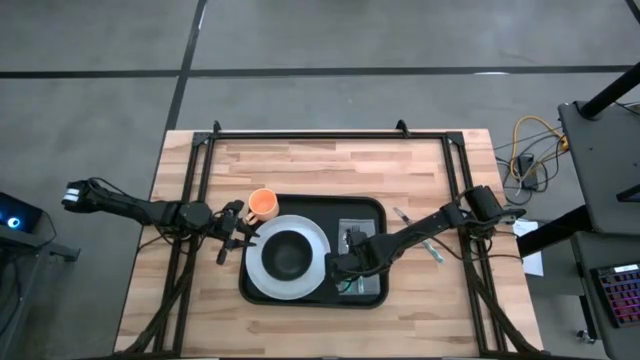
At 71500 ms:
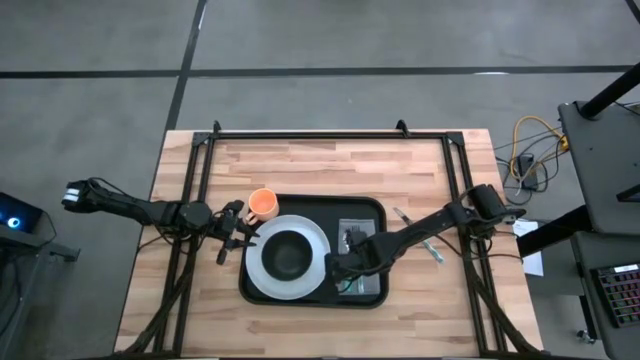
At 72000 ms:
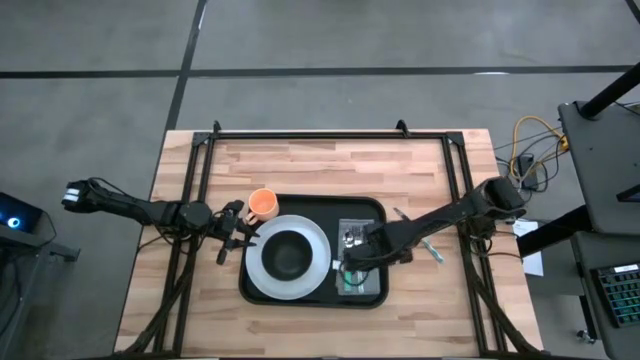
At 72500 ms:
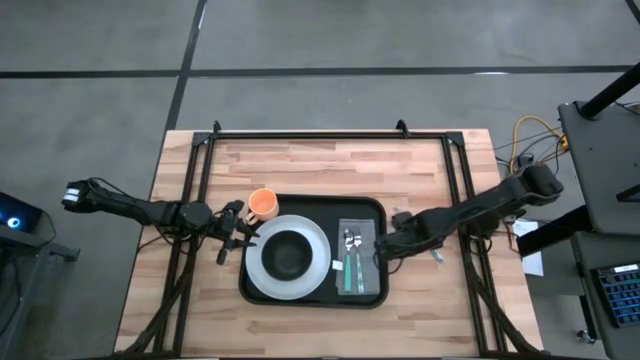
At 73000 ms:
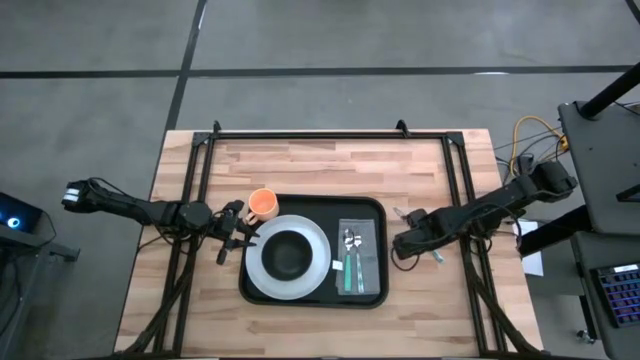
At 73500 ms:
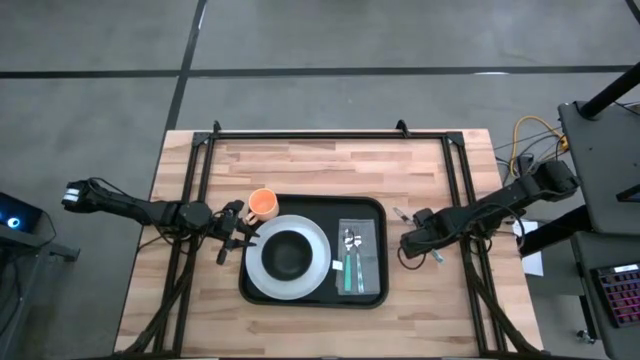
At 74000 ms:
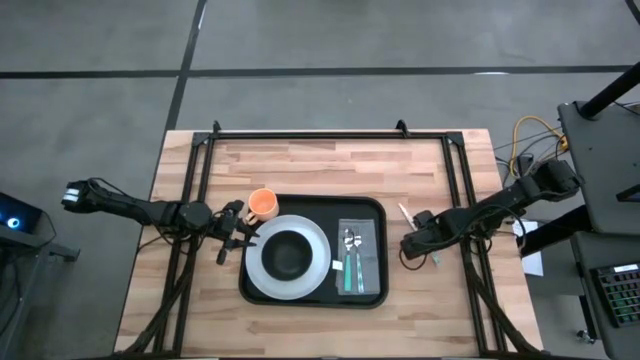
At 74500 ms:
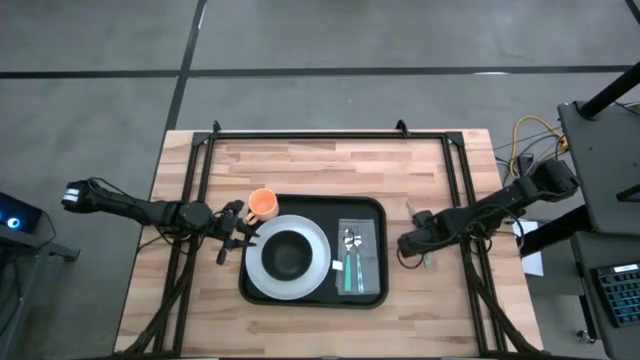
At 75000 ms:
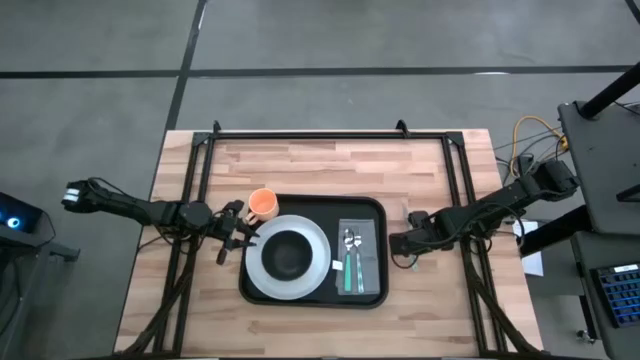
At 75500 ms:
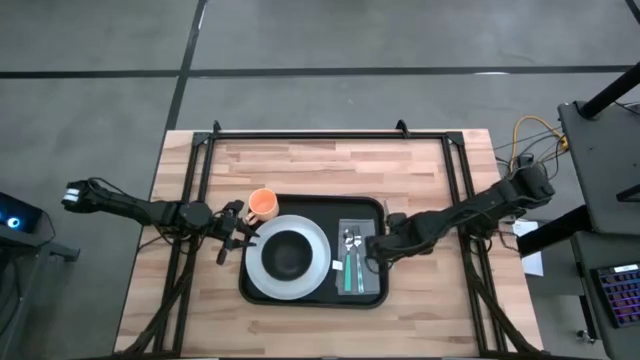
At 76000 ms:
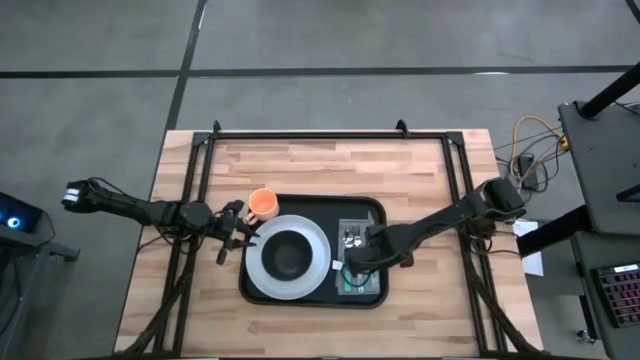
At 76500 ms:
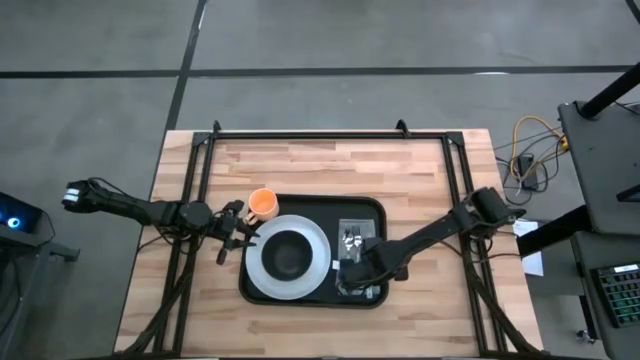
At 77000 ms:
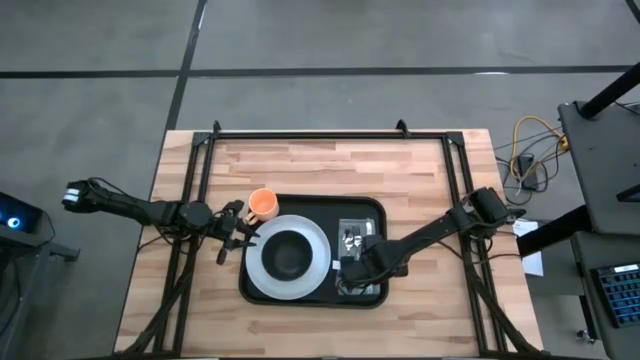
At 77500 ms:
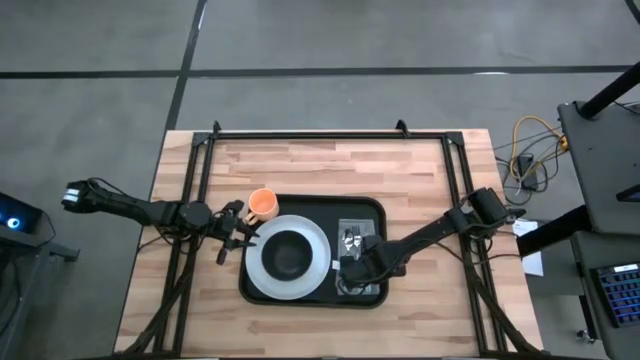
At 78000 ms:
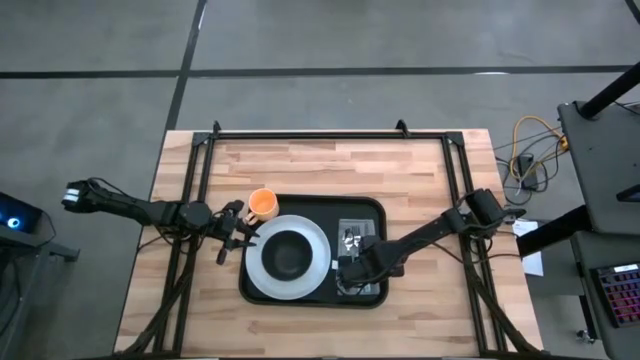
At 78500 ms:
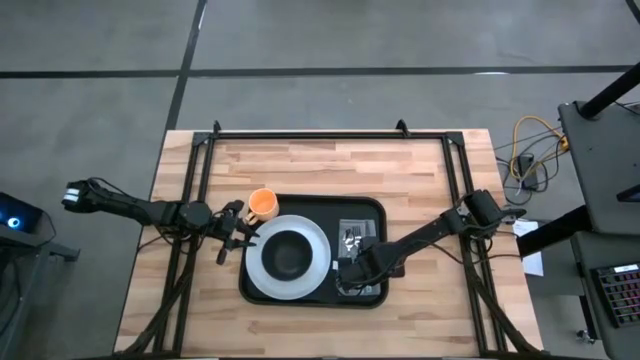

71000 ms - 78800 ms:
Task: Set up tray
Put the blue patterned knife on top of the gray napkin to the right of the blue patterned fork

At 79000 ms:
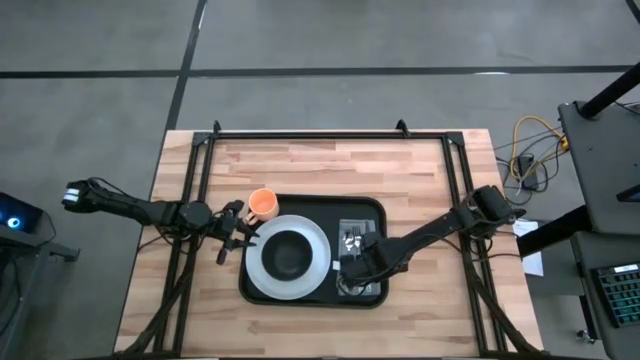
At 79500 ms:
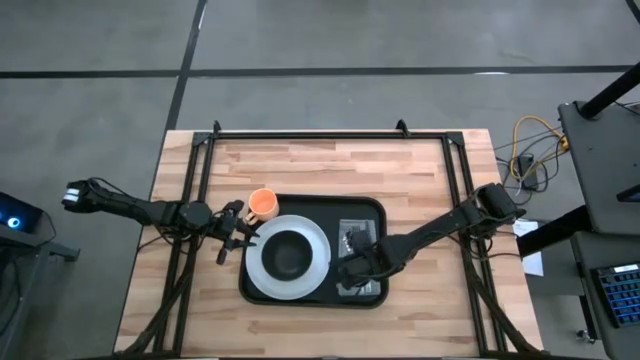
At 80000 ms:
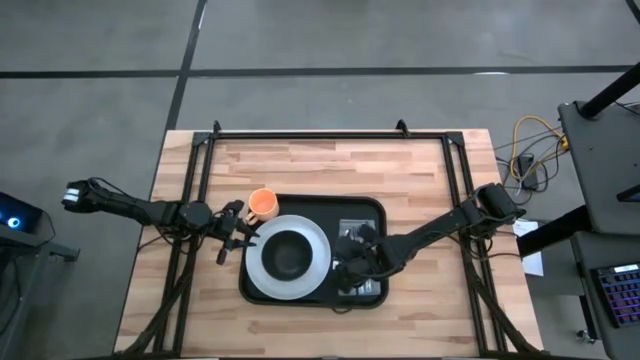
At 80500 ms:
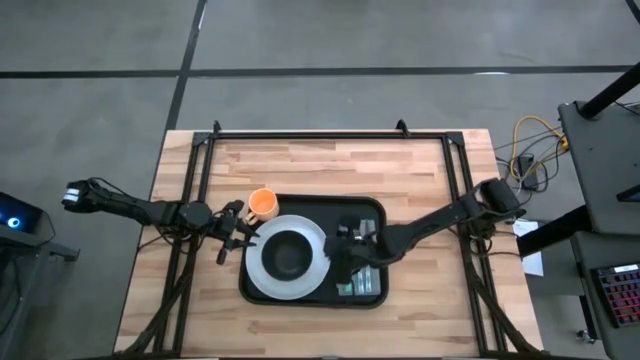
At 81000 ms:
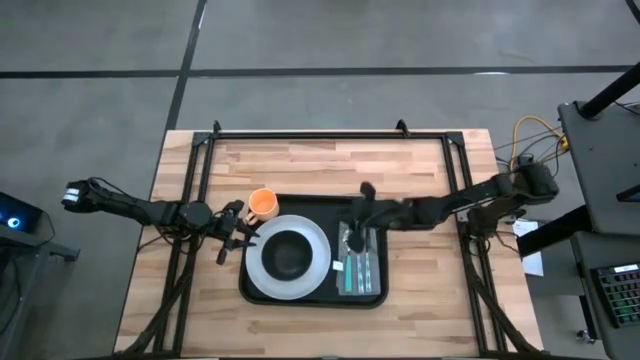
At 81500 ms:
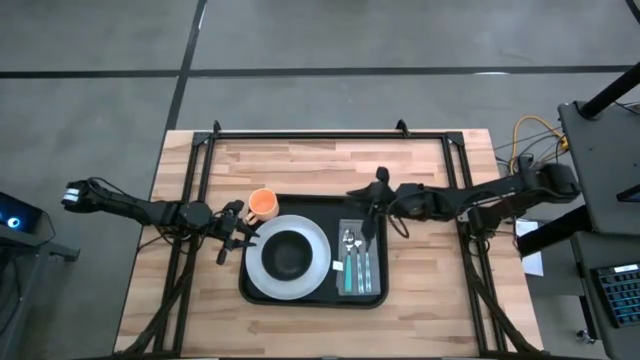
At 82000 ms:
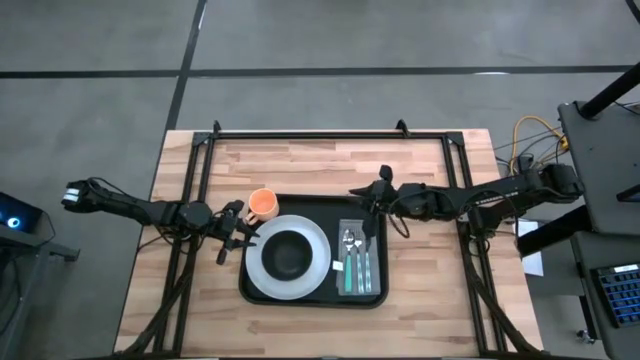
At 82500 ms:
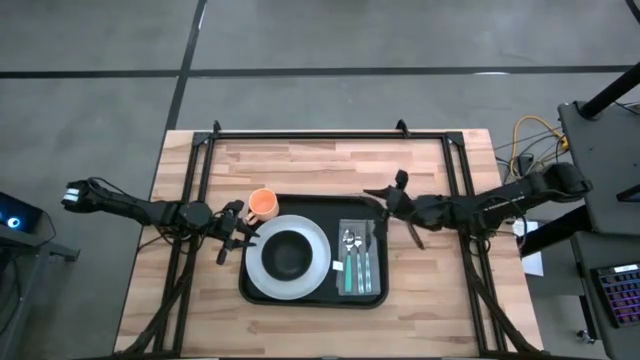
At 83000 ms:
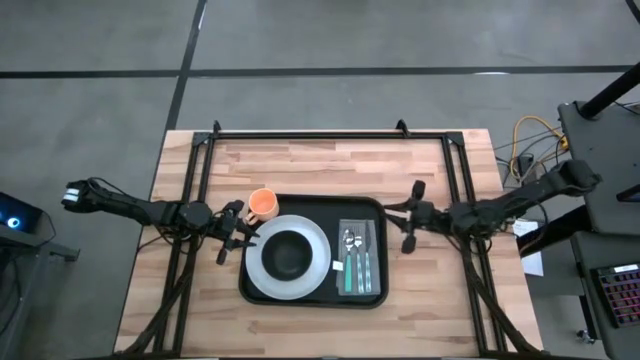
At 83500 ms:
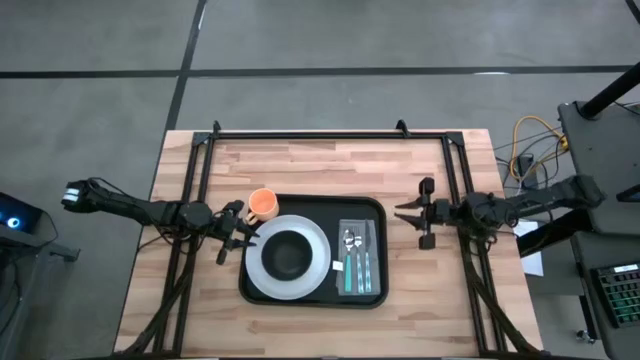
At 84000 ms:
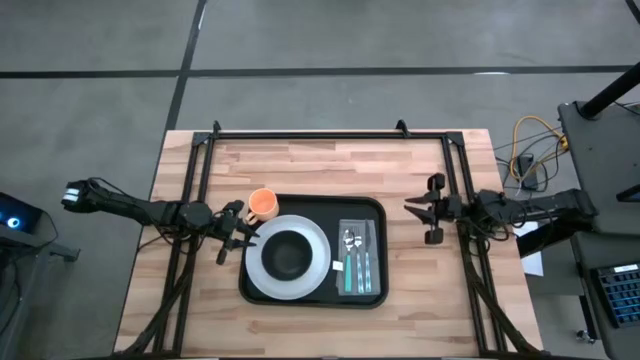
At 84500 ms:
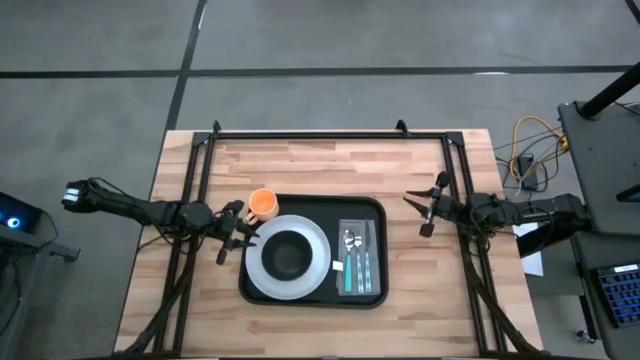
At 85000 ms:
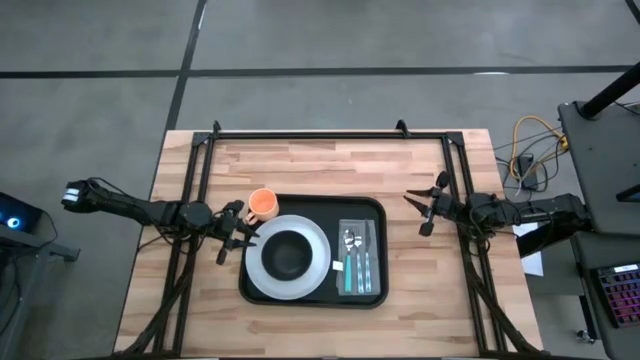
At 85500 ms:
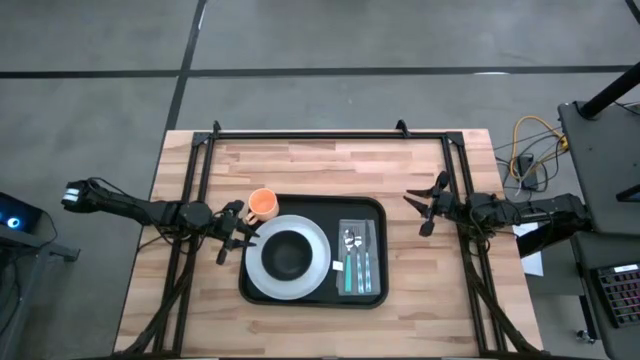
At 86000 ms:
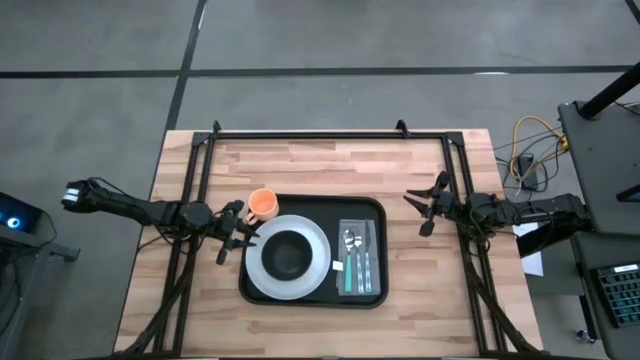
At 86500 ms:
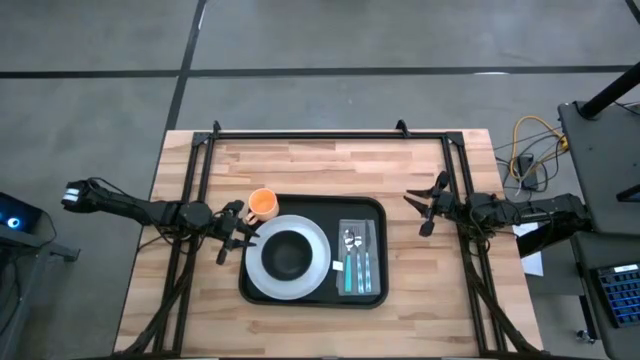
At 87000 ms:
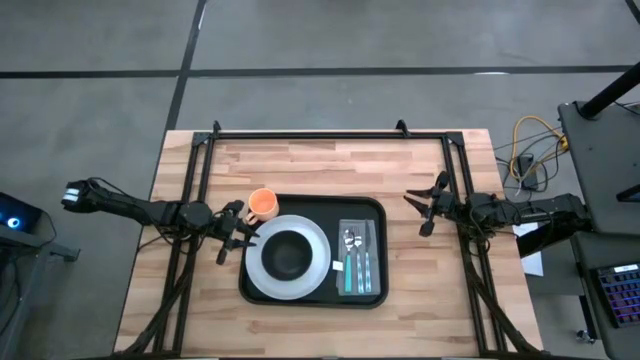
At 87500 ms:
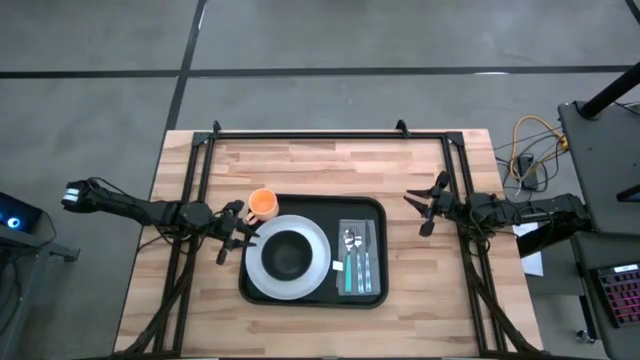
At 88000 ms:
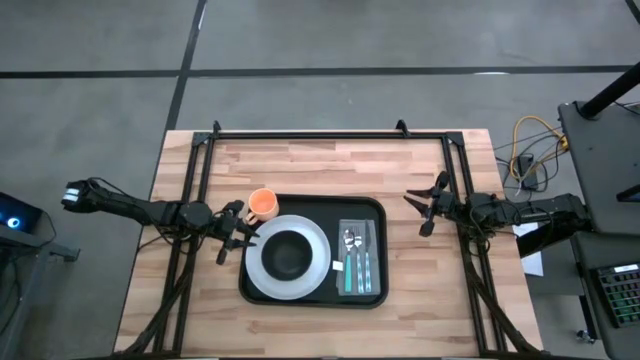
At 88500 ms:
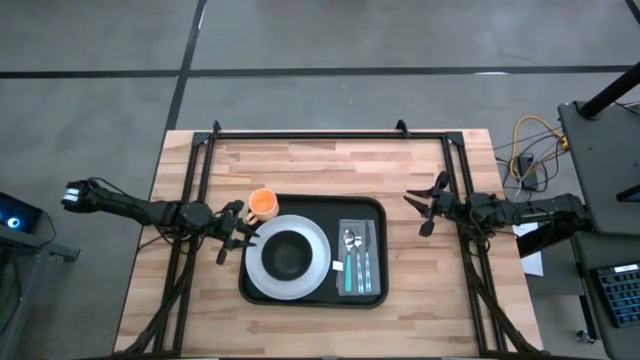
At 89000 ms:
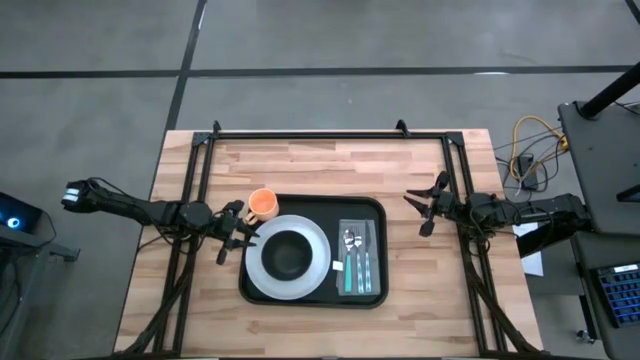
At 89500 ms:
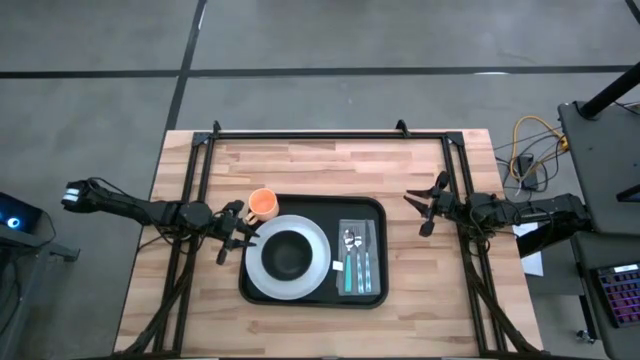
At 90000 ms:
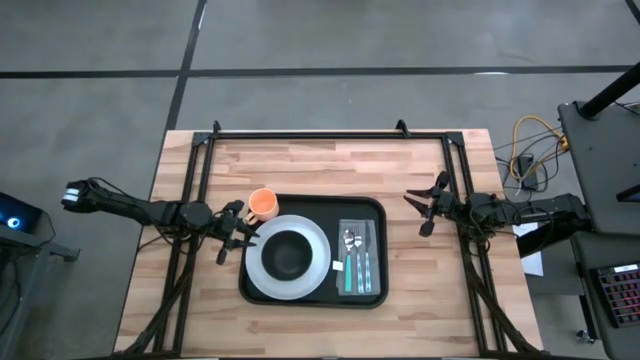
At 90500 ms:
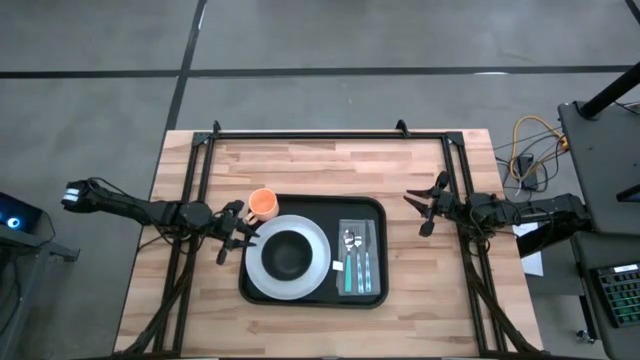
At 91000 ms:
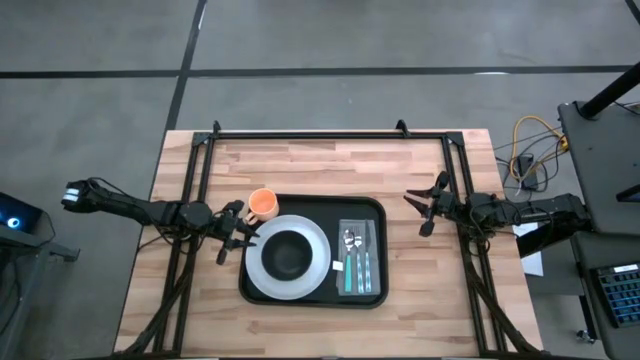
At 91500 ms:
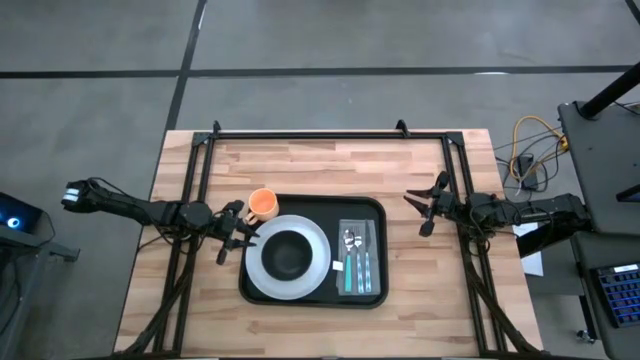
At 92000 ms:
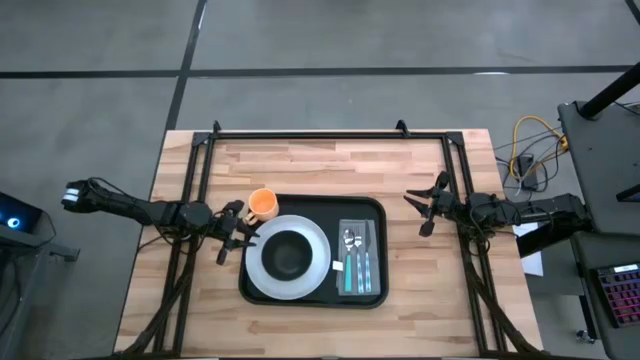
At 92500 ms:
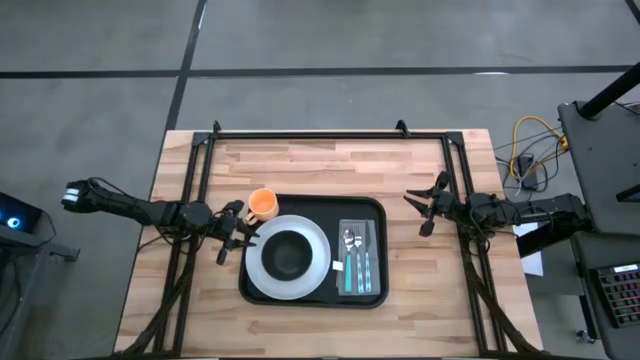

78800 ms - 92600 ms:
Return to Home Position

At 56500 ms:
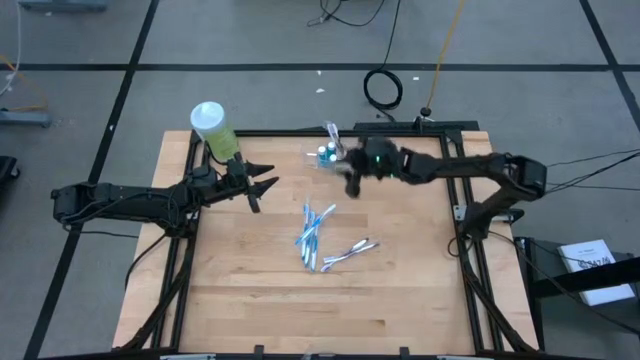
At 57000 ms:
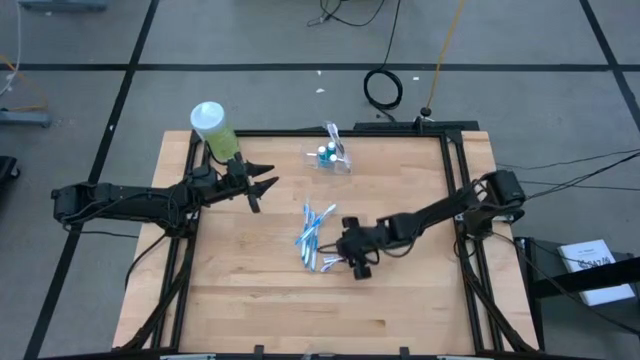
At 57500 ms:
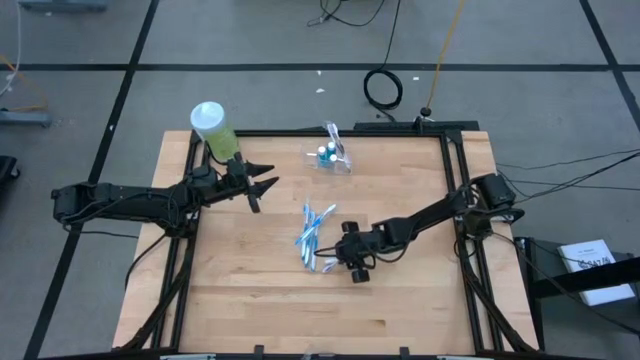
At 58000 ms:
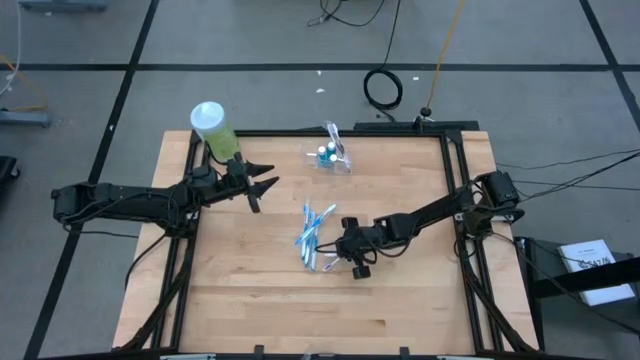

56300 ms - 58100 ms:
Task: Pick & Place toothbrushing station
Put the purple toothbrush into the transparent organizer
